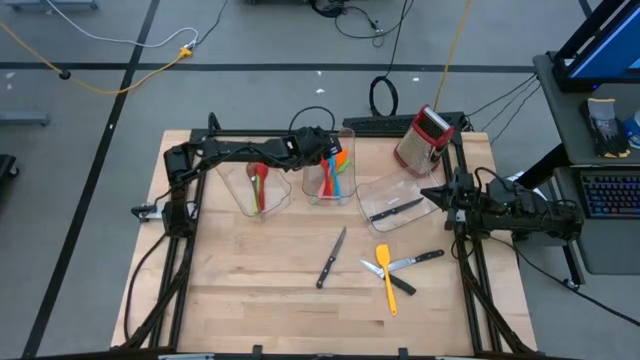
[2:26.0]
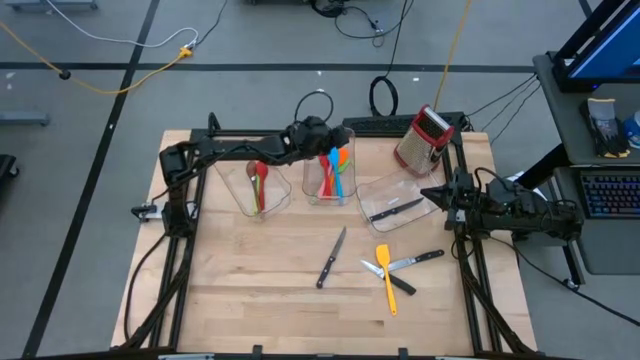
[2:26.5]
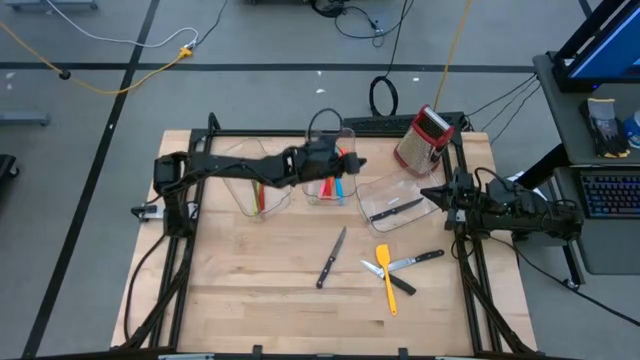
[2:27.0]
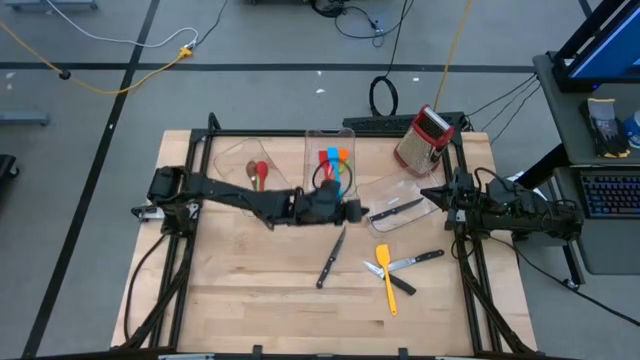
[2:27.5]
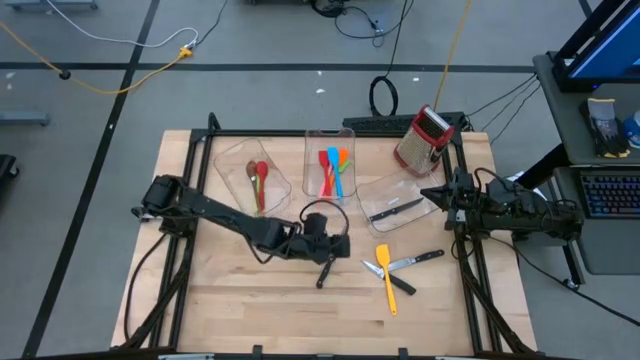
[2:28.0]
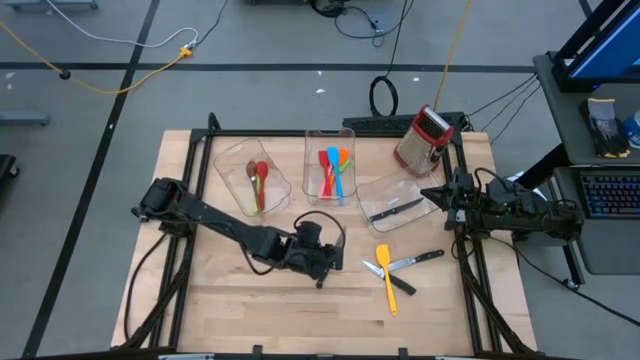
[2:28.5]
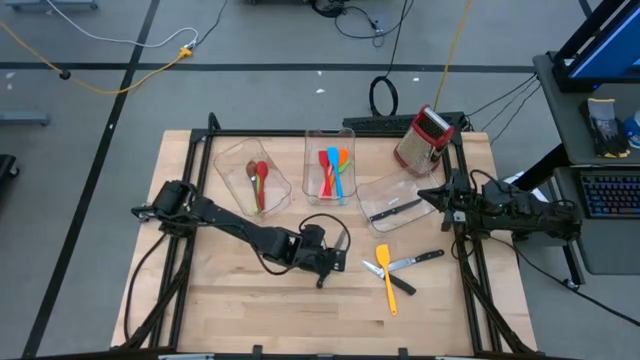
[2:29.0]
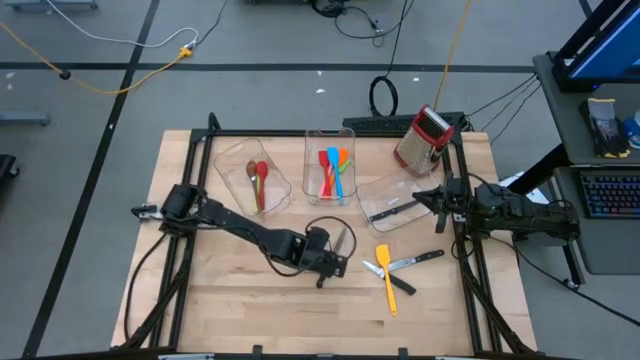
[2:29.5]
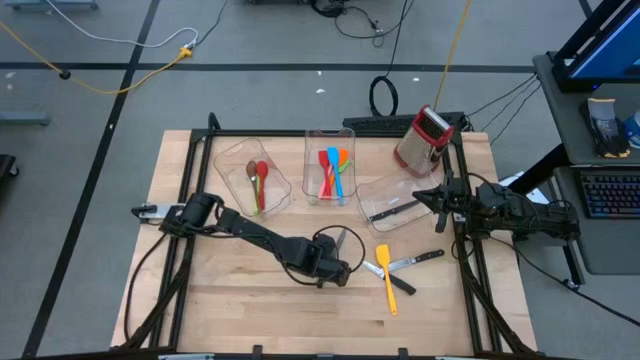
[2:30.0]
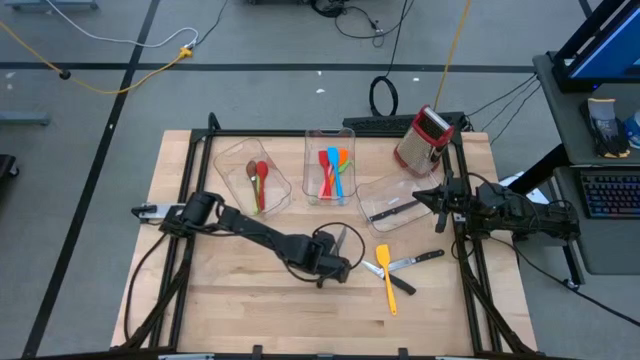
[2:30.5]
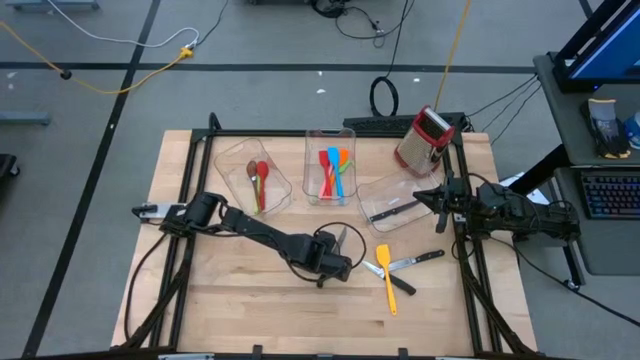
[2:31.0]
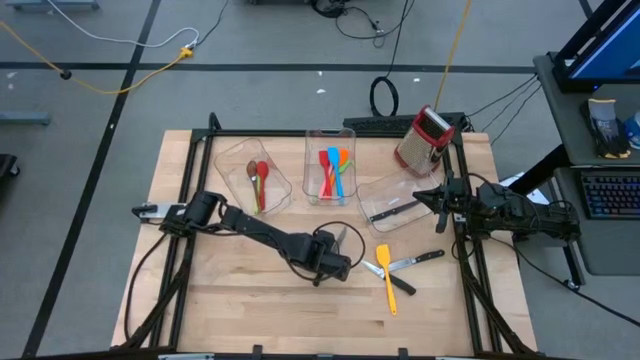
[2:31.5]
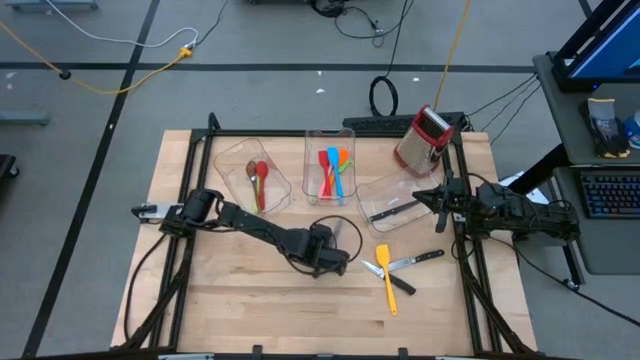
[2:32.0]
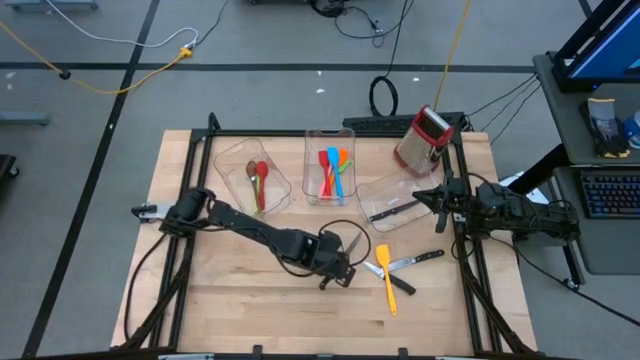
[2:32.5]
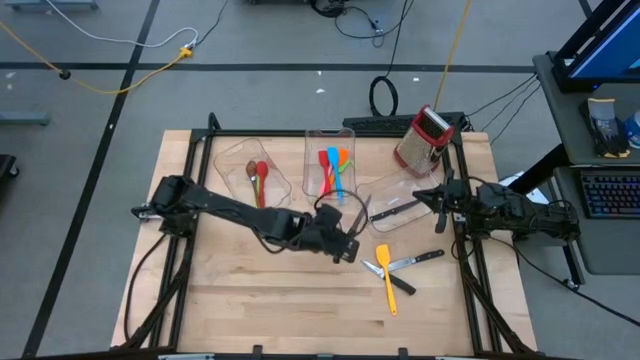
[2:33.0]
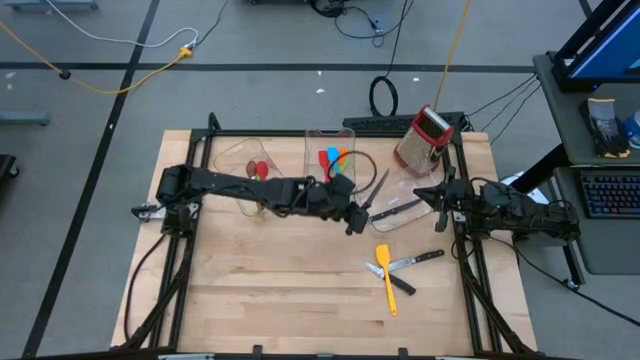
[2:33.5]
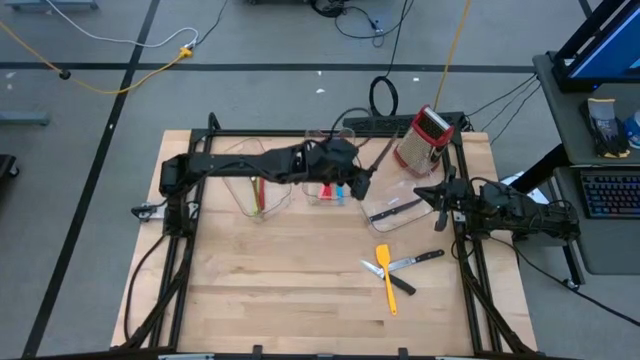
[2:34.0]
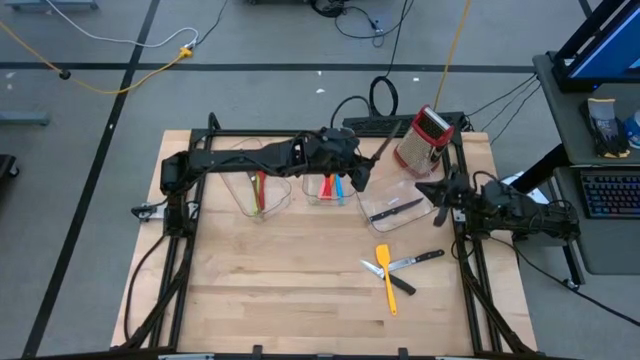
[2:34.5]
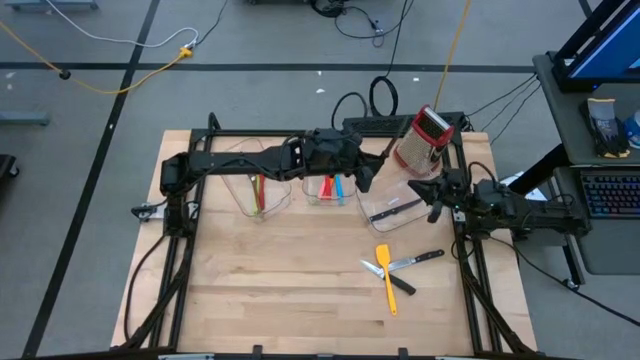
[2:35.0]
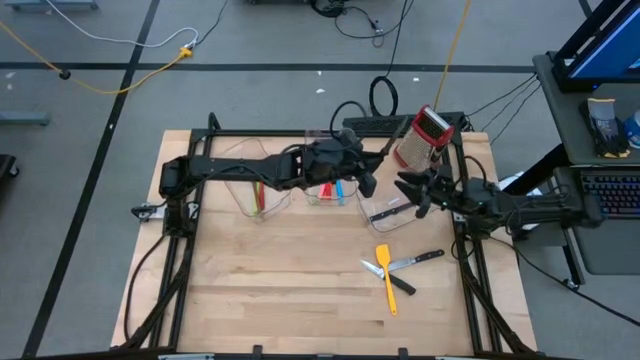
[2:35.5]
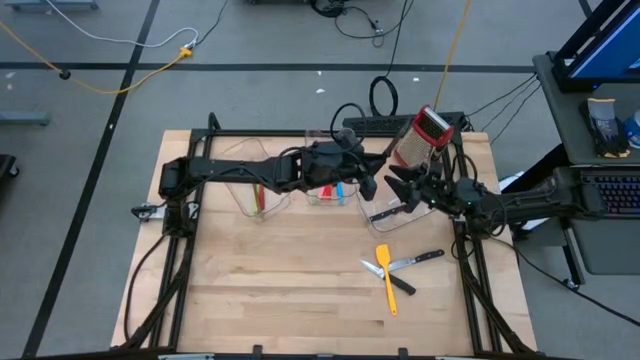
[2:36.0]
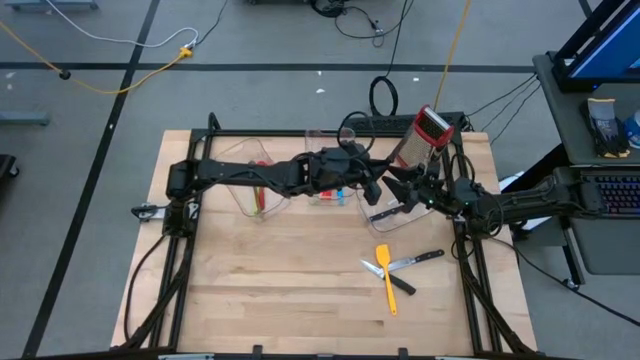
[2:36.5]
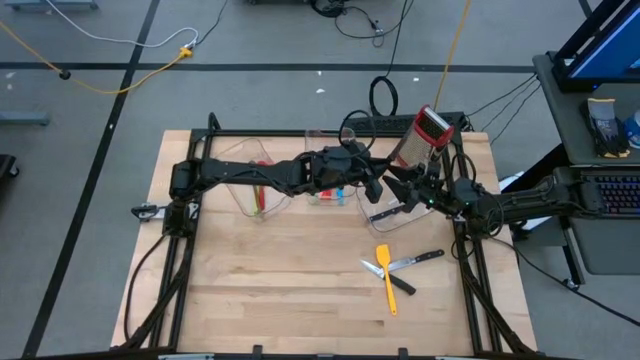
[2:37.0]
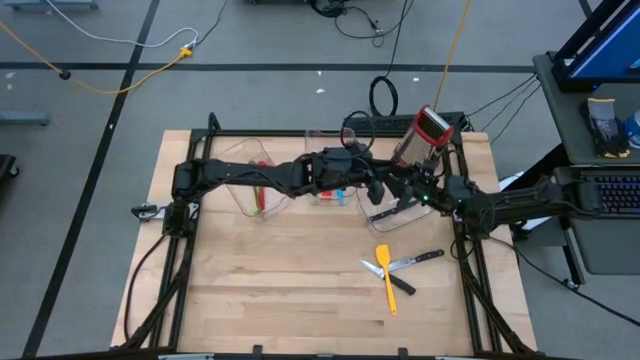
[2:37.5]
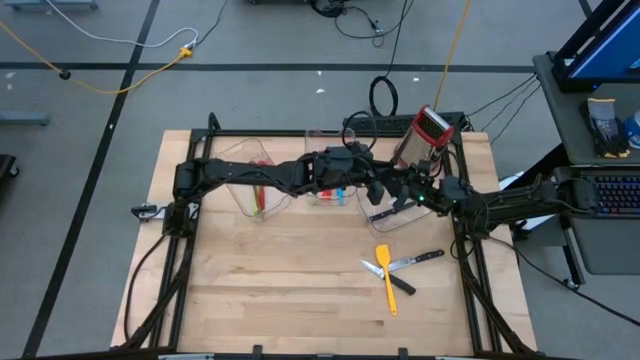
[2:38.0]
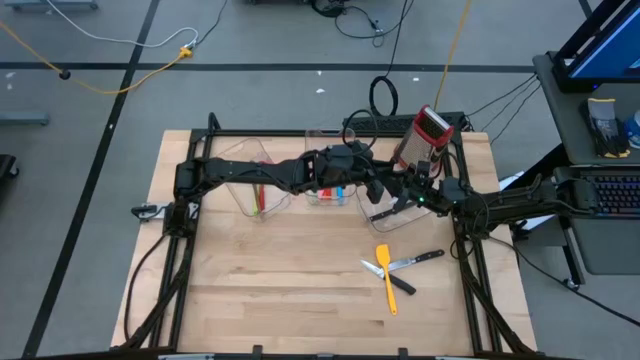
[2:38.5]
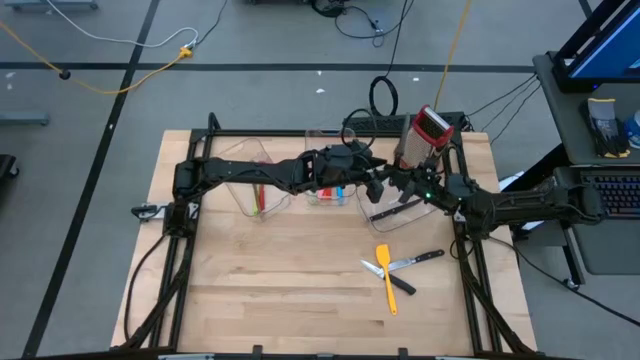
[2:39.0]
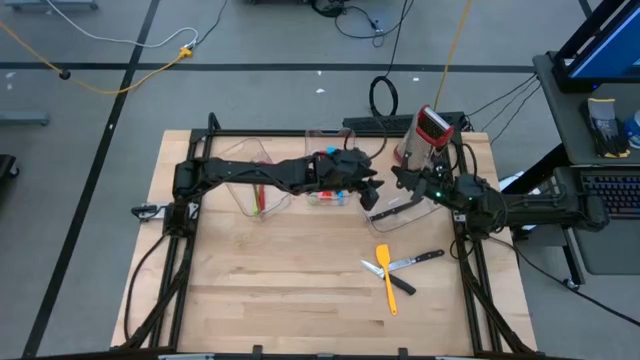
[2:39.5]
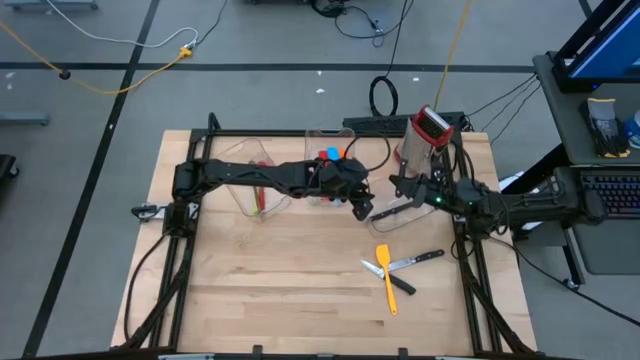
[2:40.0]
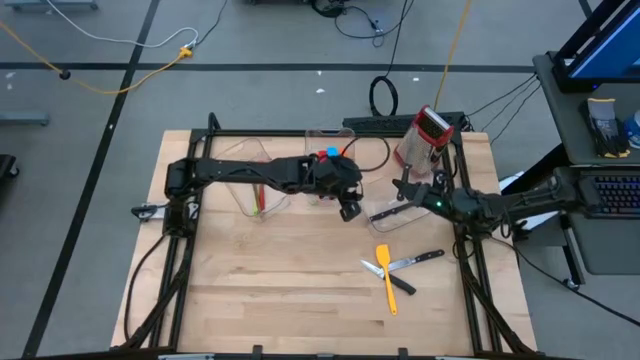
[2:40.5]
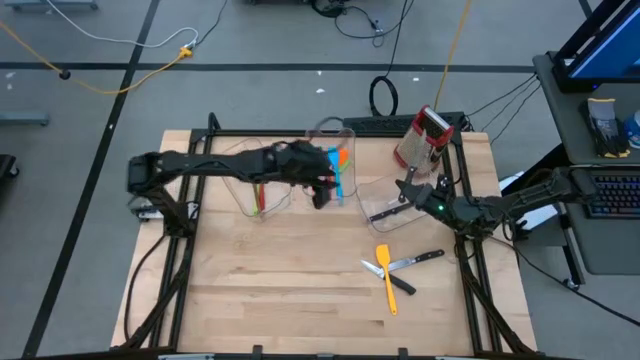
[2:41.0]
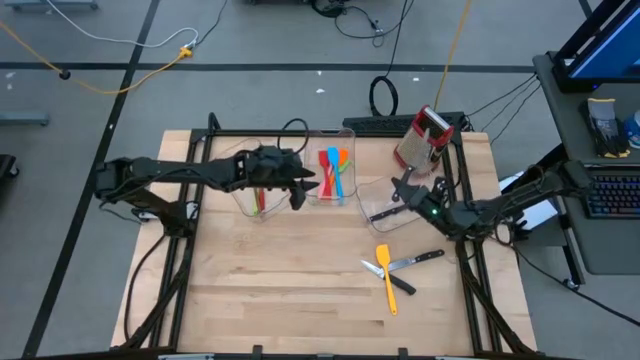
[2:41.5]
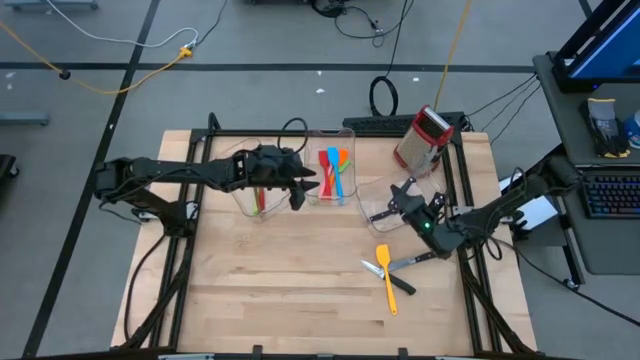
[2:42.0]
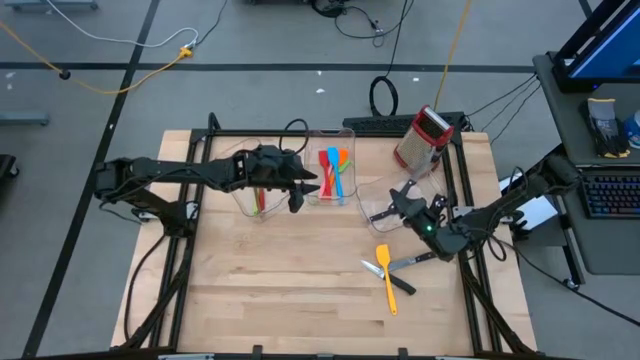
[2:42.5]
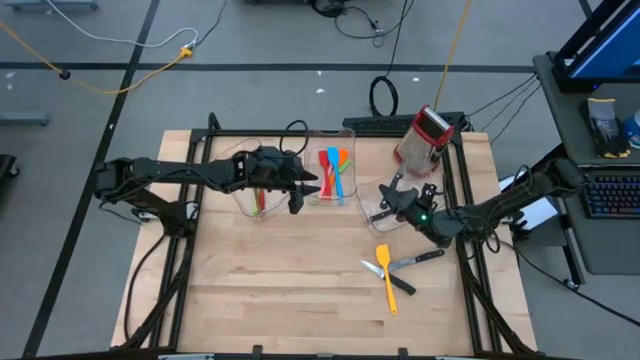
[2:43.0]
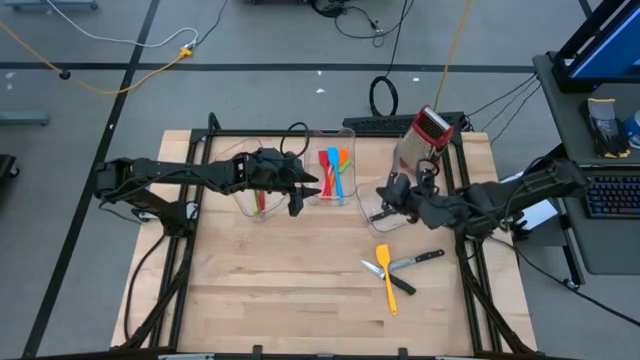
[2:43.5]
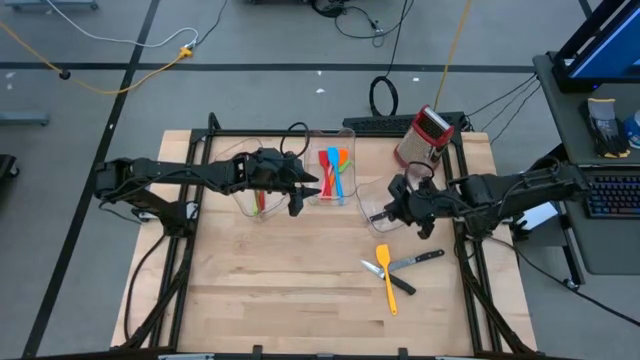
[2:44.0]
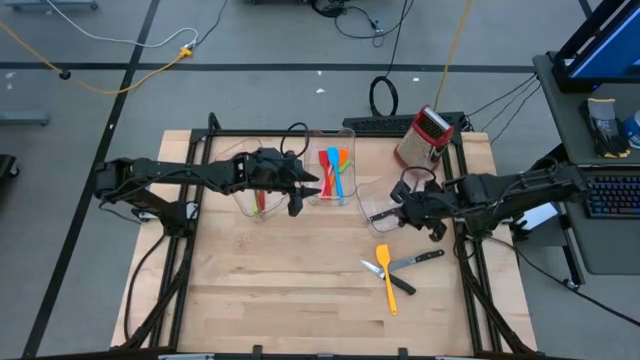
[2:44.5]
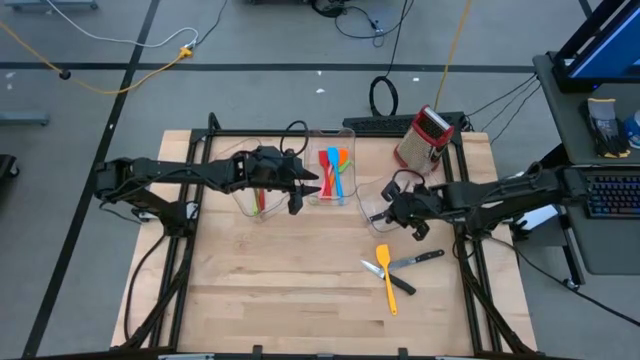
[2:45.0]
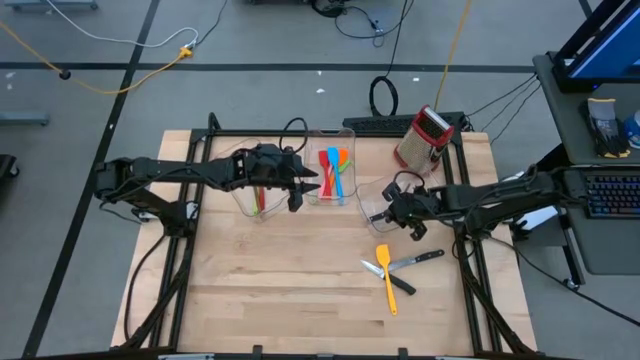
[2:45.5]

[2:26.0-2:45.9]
Task: Pick & Place Kitchen Items
Put the black kitchen knife into the right bin

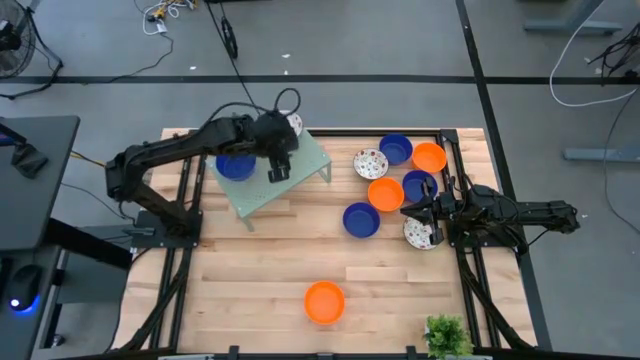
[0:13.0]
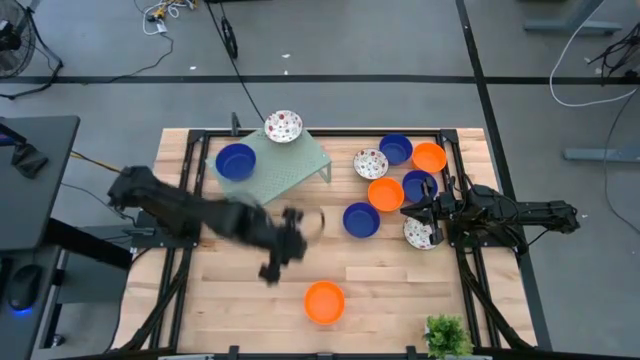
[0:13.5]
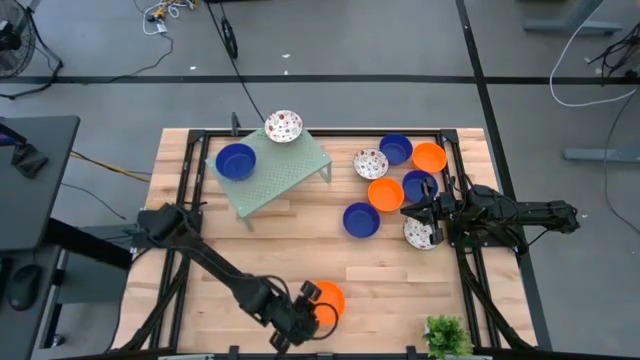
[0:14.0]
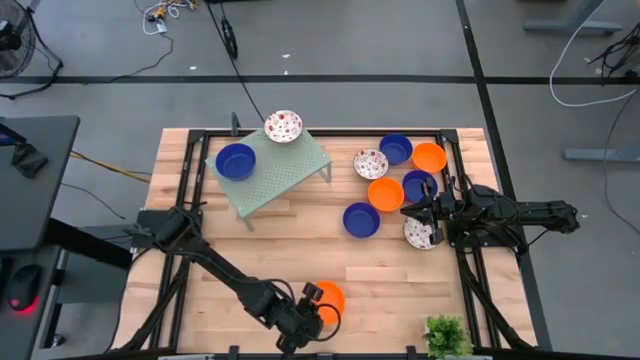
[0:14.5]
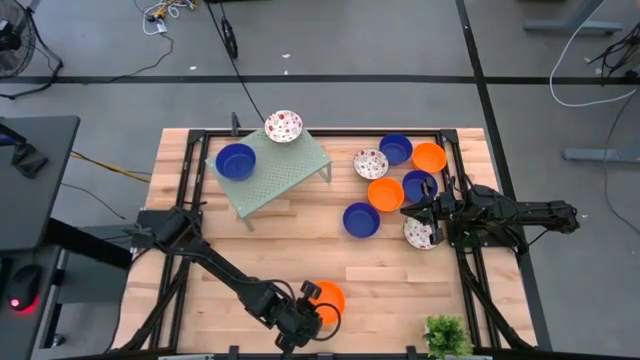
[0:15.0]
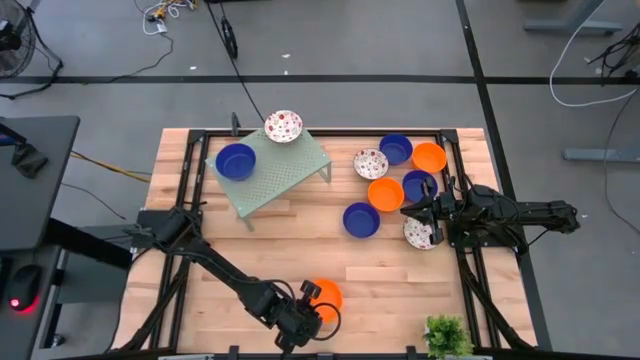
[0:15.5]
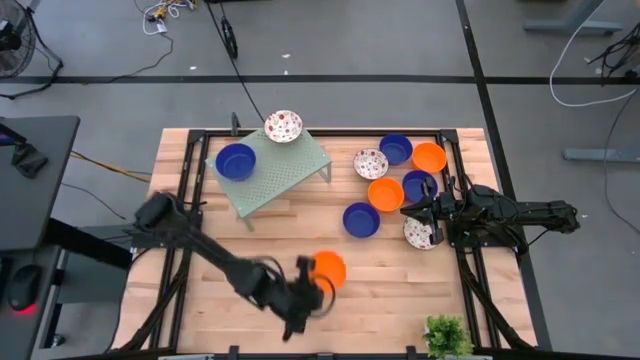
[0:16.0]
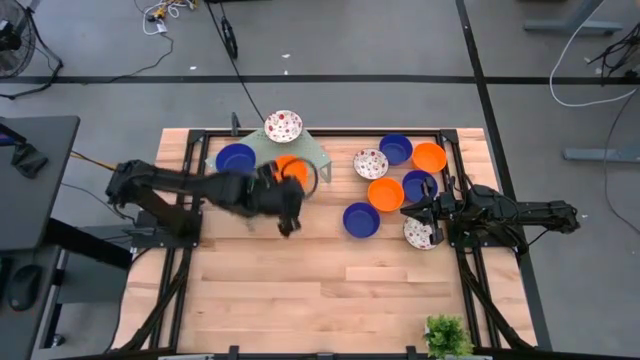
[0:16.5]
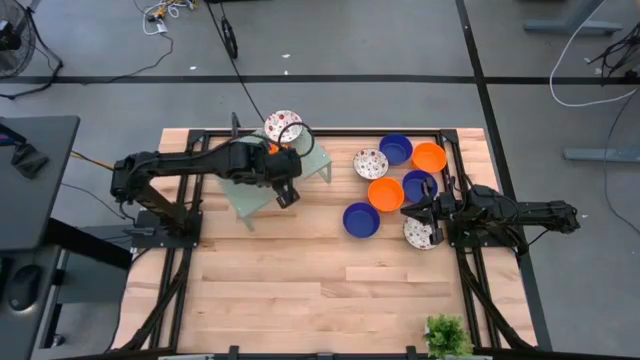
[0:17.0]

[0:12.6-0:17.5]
Task: Pick & Place Mini bowls
Put the orange bowl on the shelf
